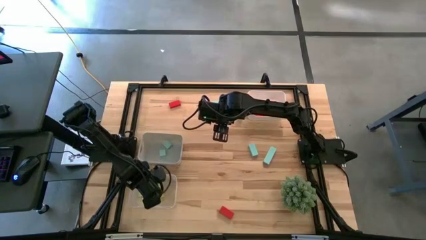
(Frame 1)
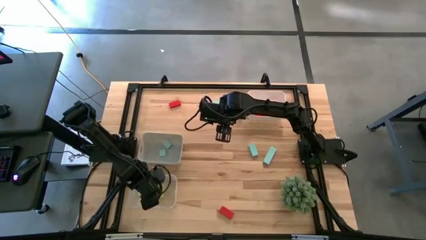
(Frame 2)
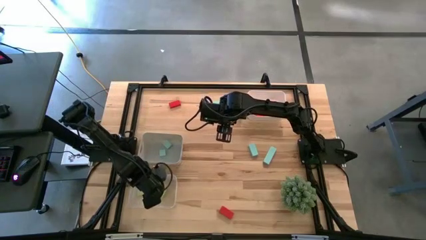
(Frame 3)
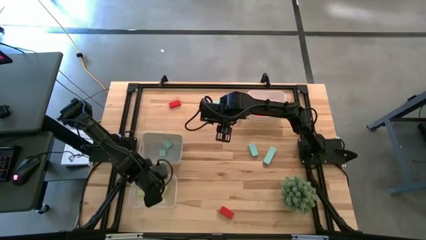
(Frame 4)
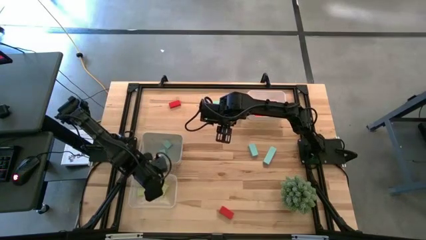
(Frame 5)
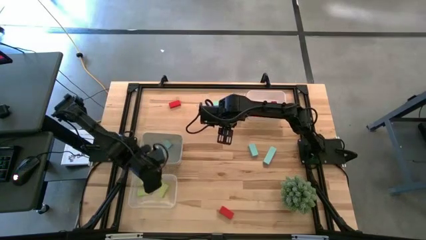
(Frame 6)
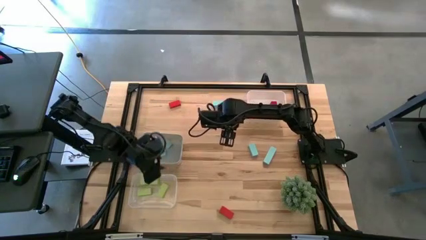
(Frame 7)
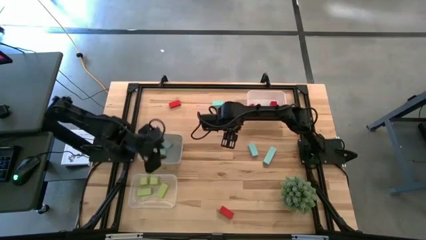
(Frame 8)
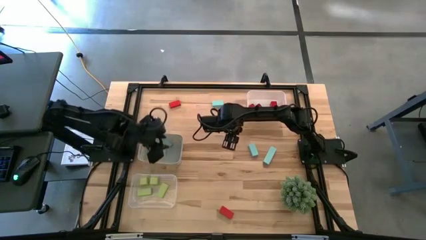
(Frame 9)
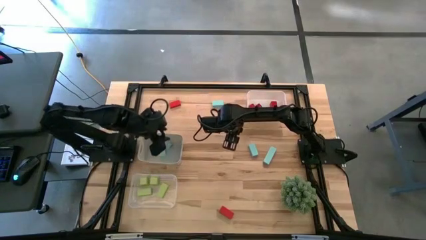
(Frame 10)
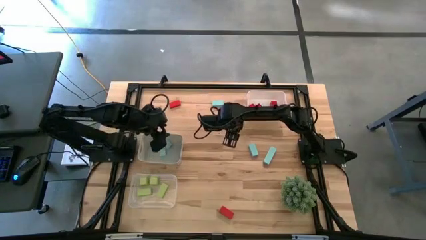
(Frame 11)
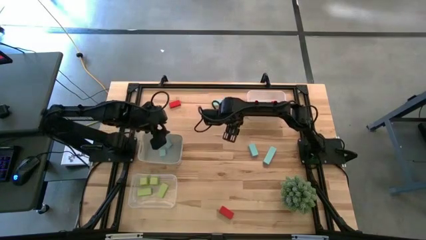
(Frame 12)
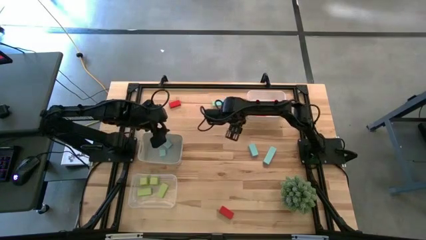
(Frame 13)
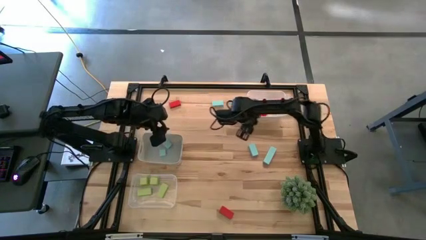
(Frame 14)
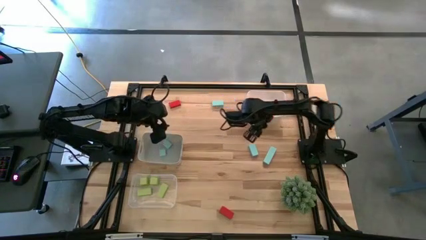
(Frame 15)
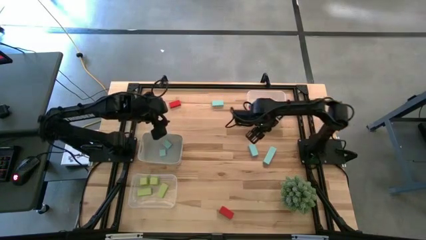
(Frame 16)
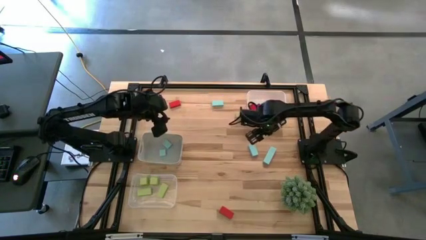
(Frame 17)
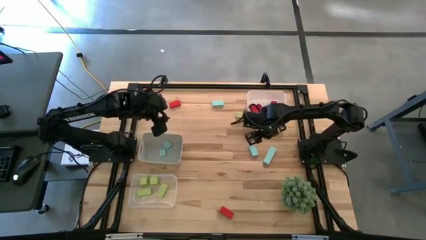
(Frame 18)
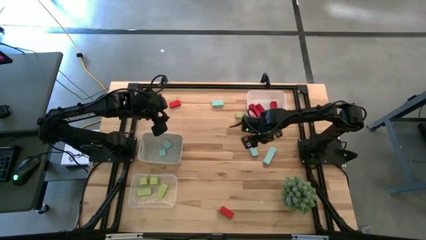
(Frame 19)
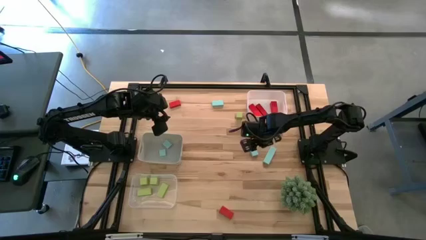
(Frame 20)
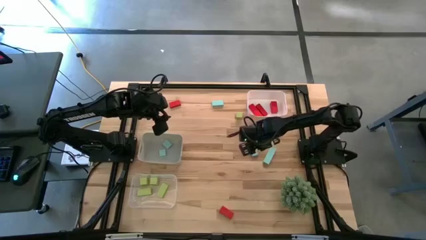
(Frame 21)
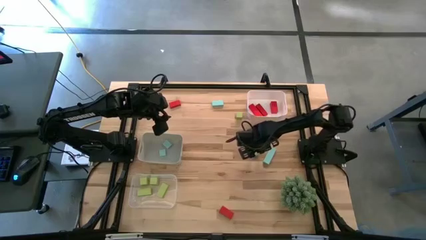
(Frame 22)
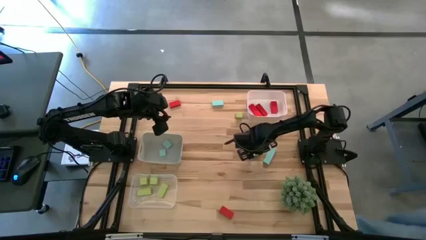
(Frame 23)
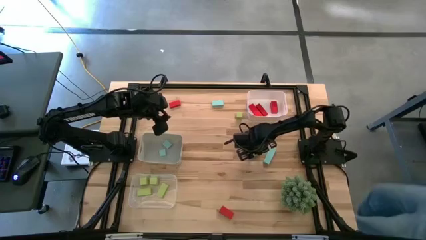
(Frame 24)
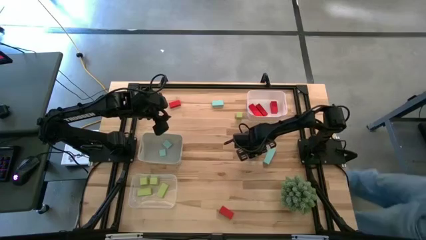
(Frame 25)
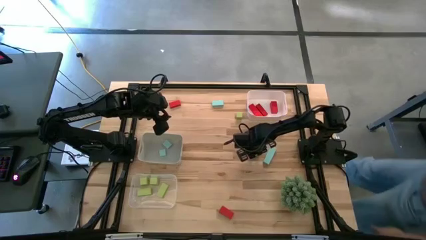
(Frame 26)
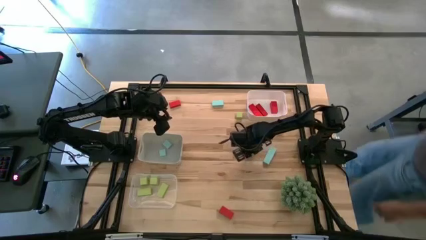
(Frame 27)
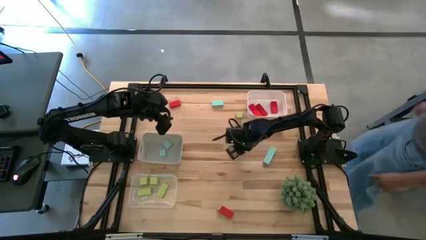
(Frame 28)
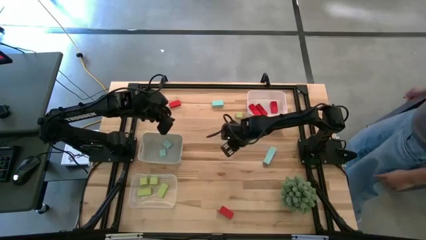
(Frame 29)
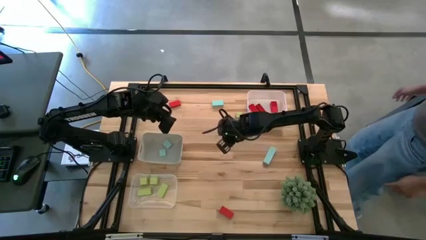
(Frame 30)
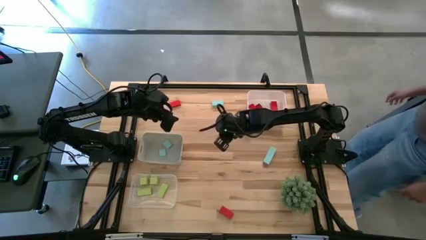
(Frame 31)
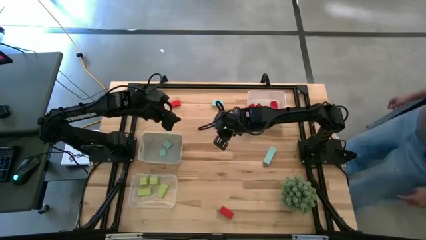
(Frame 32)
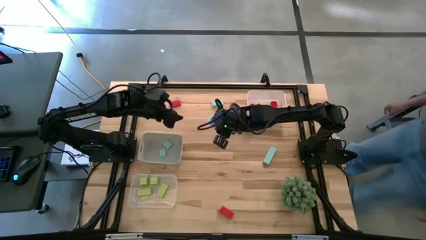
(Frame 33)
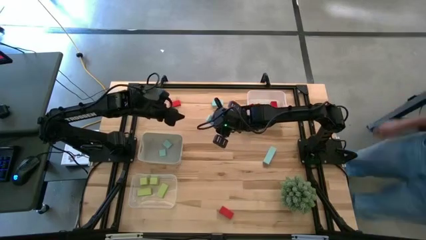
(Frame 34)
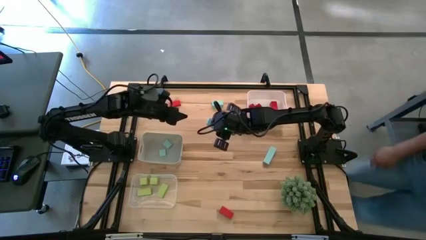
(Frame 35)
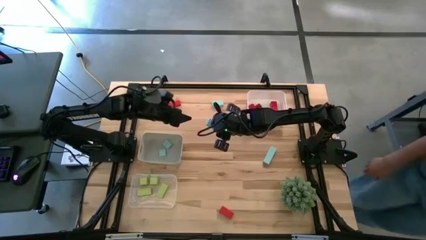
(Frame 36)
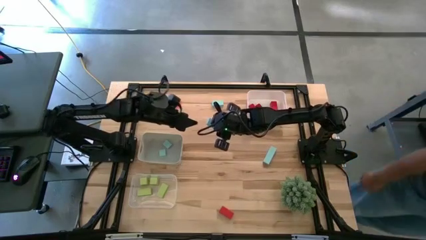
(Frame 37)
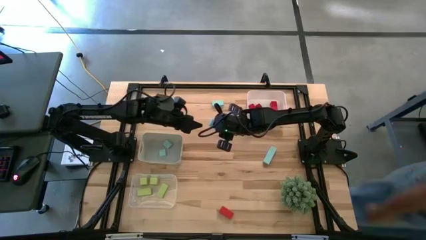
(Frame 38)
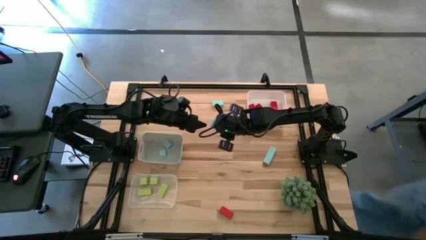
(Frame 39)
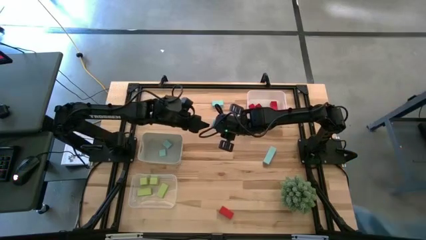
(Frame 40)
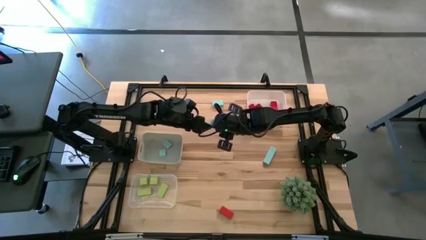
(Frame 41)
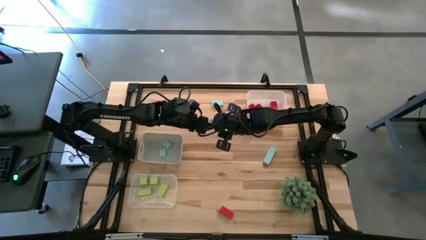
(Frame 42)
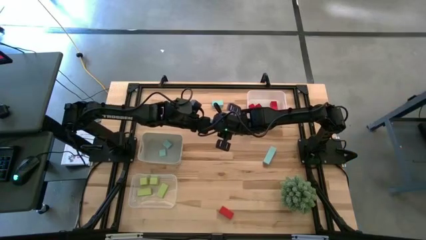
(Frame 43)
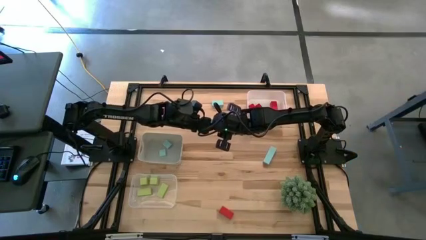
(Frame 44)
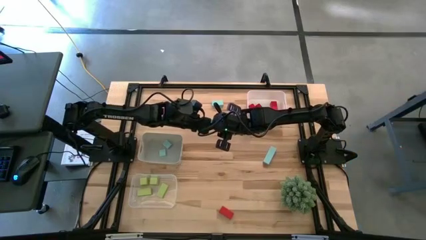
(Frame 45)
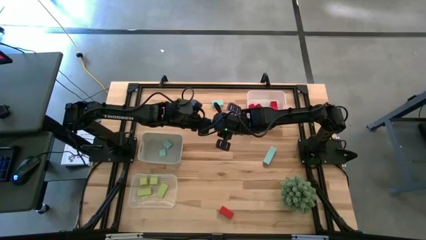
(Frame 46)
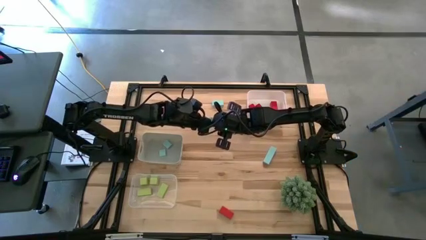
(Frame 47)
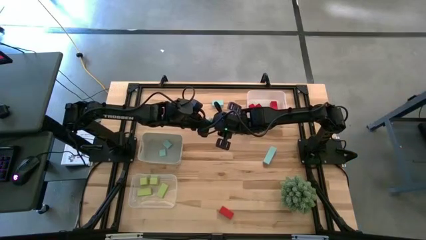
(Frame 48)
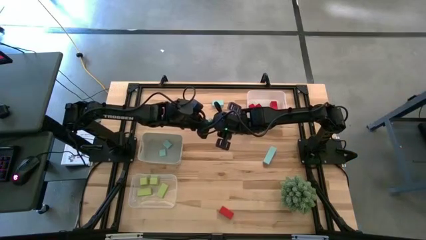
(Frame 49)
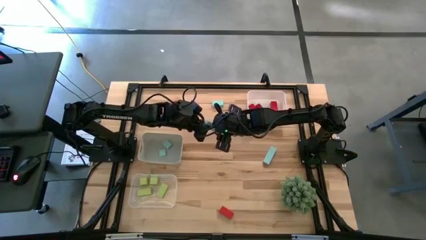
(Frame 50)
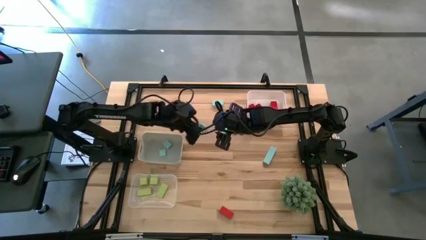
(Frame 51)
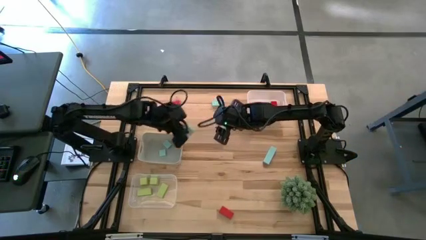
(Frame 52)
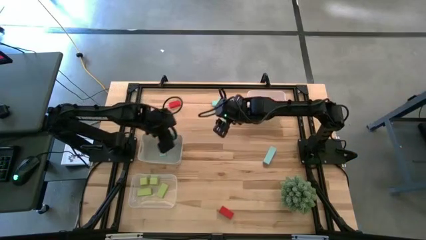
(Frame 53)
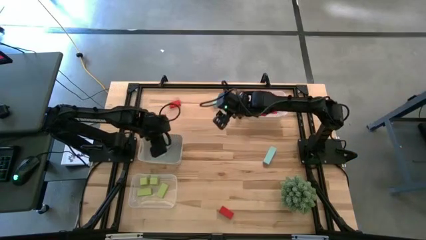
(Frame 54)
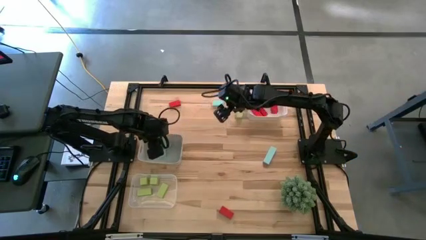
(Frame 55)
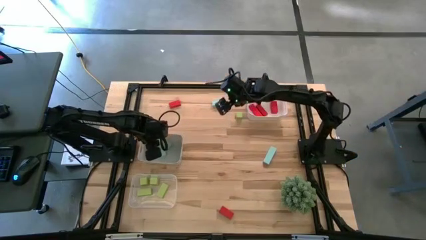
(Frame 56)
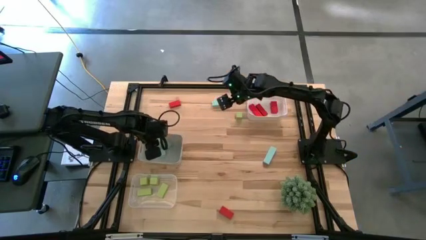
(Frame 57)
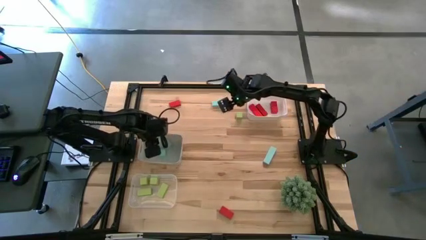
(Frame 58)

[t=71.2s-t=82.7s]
Task: Sort & place blocks by color
Put the blue block into the gray bin

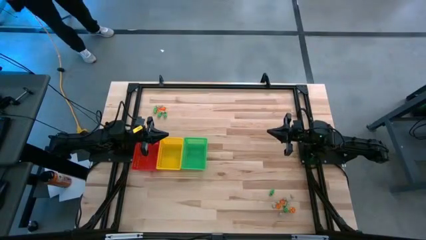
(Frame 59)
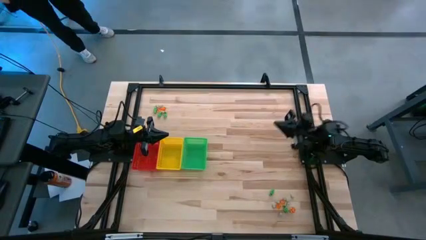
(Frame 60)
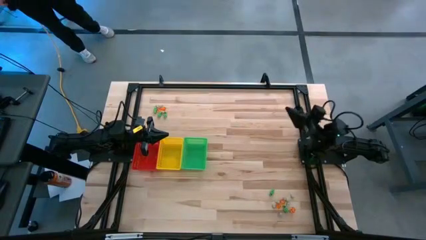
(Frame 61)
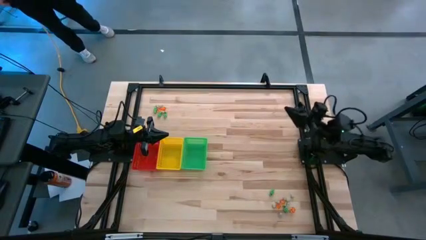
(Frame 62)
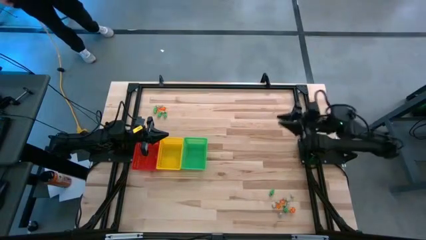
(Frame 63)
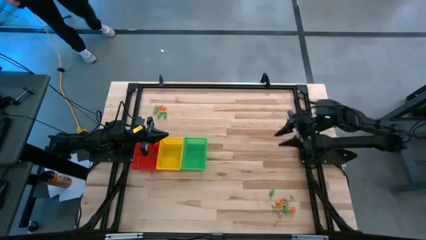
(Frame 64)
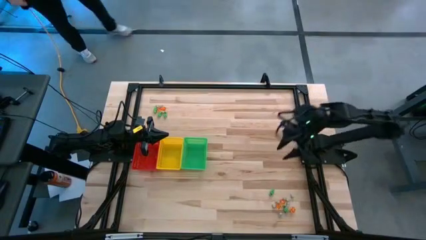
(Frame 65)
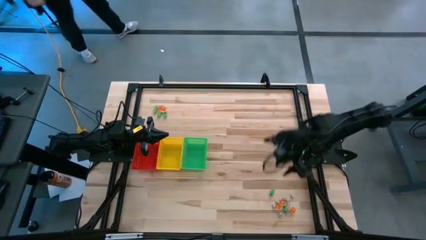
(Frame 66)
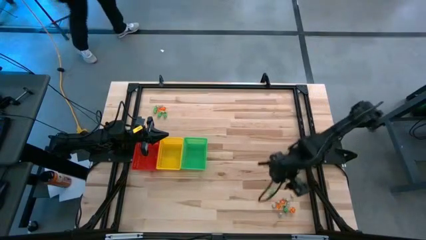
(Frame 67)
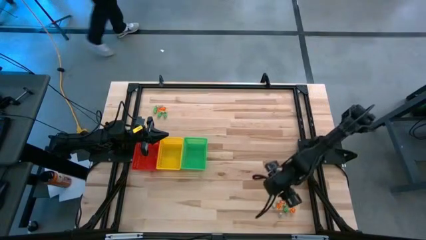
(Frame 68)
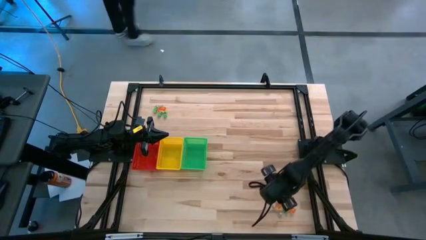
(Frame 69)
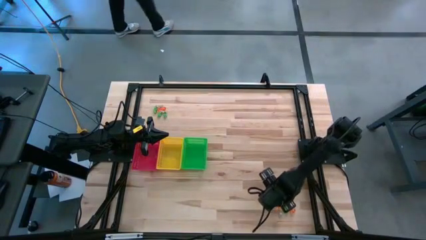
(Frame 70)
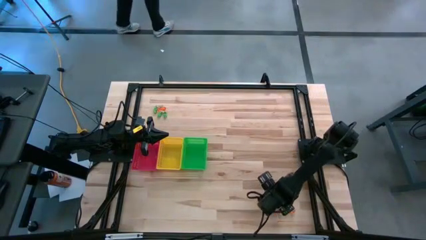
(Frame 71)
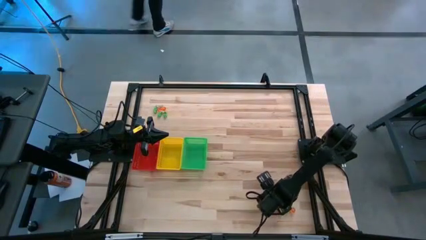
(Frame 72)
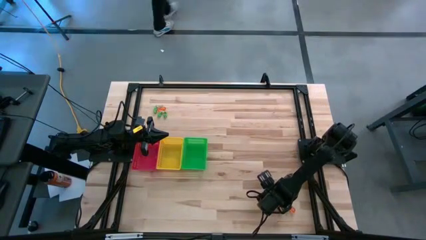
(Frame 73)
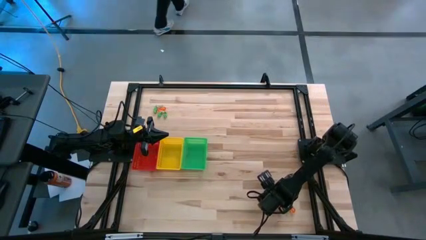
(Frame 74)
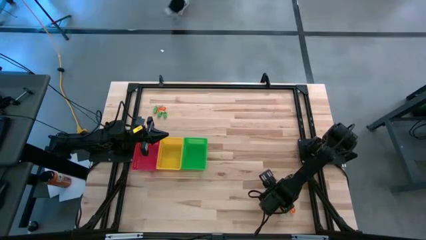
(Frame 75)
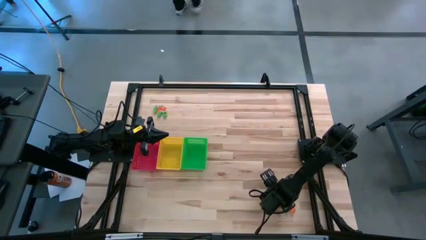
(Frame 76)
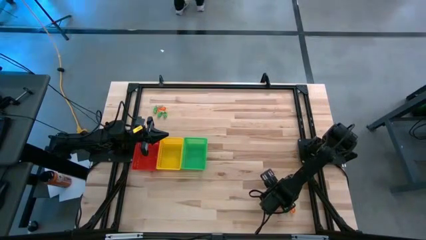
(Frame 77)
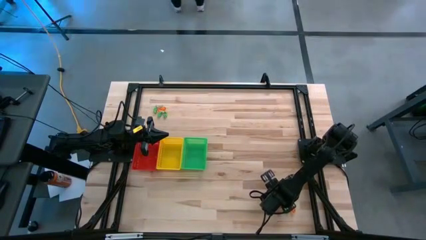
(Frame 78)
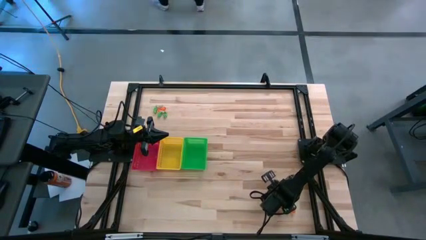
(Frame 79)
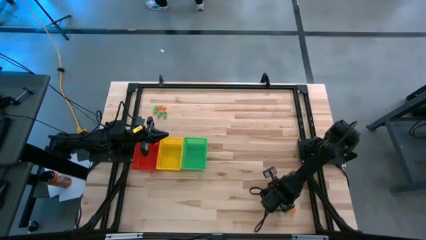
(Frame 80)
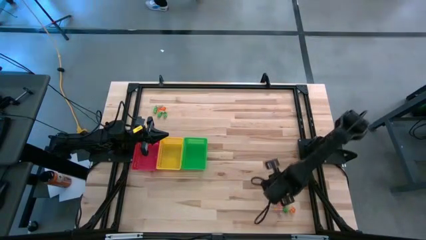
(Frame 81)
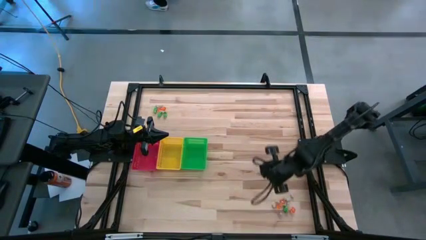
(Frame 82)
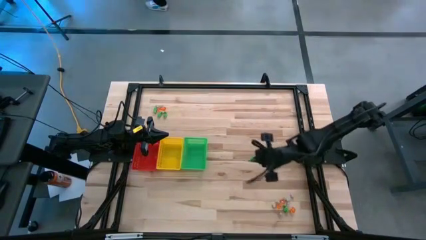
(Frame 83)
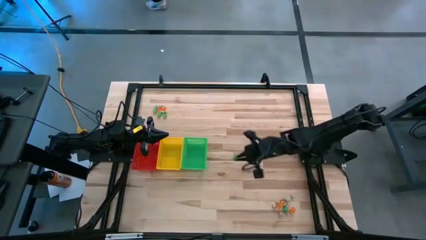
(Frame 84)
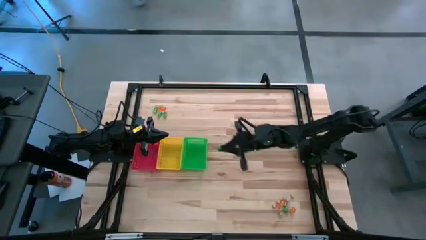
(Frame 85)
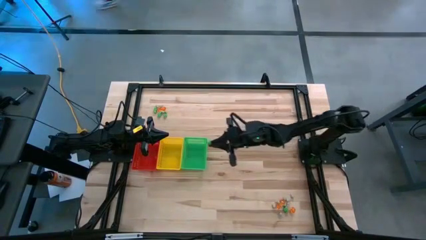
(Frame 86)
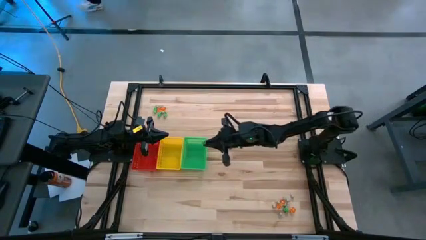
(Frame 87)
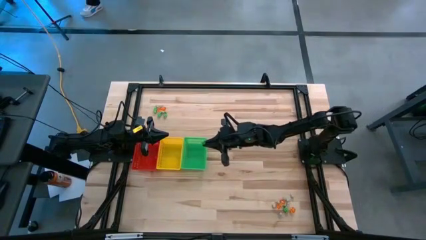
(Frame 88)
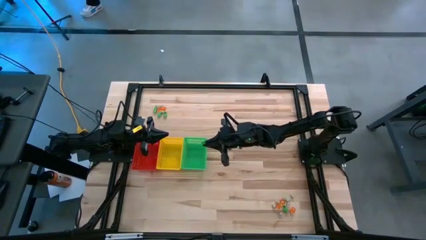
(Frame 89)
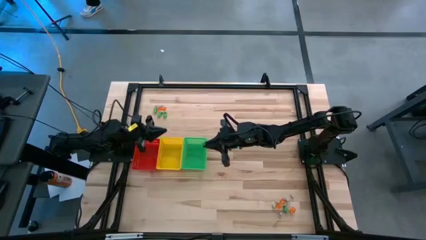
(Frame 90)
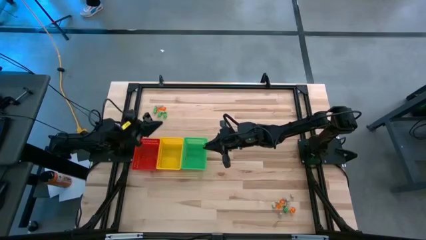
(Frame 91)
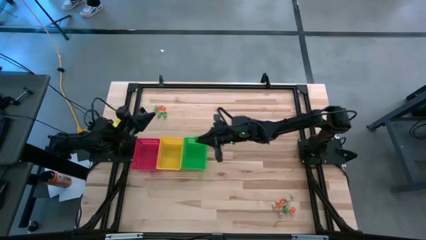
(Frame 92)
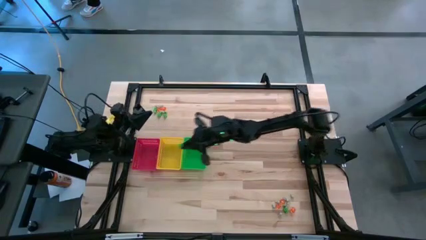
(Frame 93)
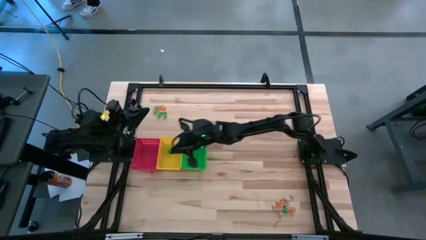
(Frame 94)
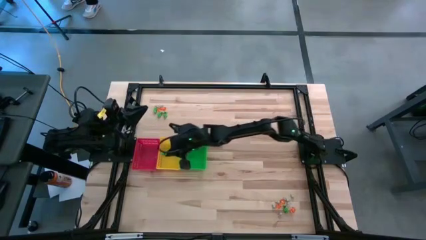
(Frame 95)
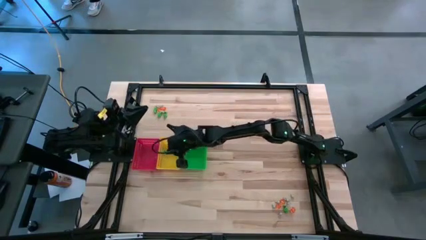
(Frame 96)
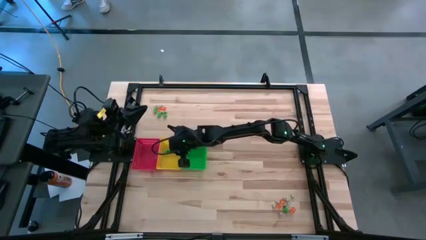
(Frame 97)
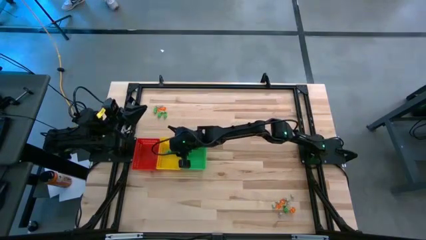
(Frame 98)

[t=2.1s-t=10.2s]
Task: Sort Halloween decoration
Put the green skeleton toy into the yellow bin
